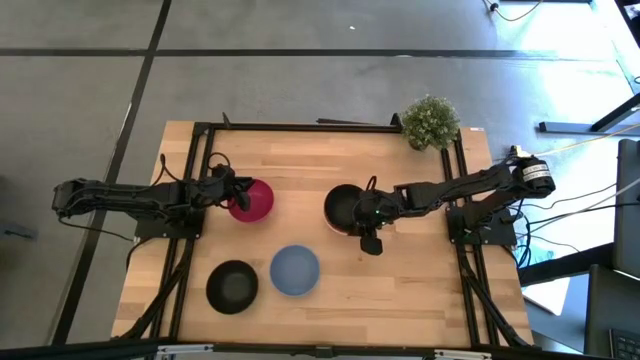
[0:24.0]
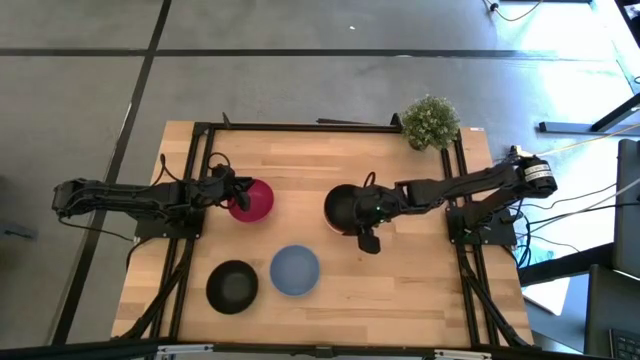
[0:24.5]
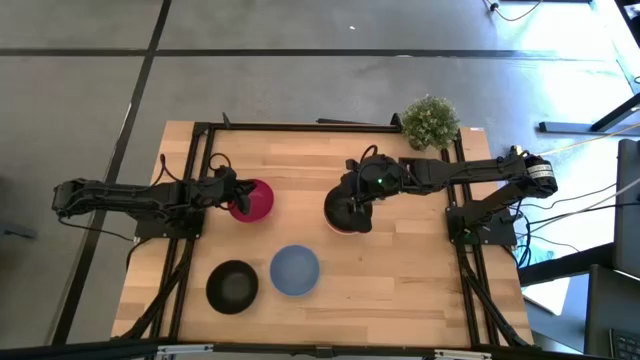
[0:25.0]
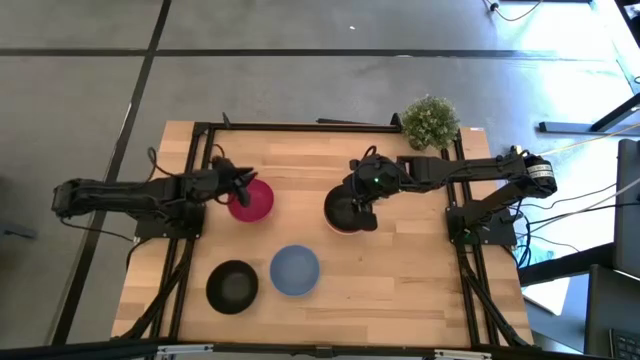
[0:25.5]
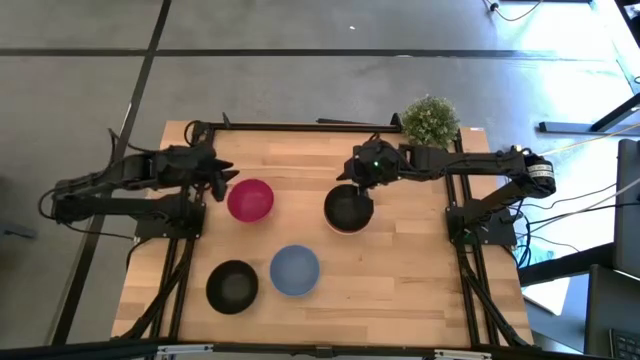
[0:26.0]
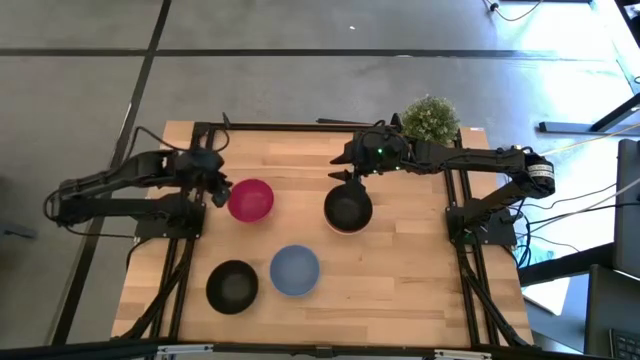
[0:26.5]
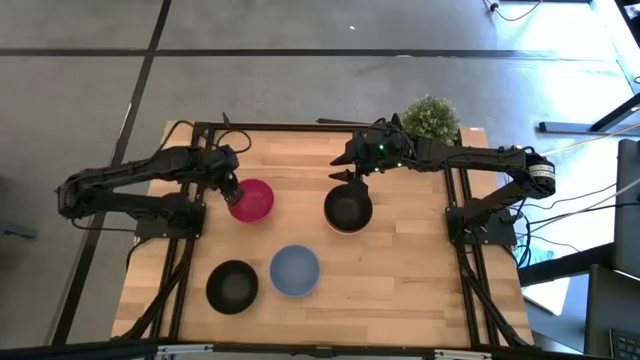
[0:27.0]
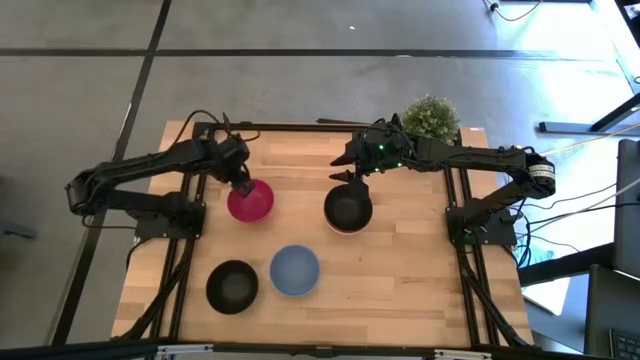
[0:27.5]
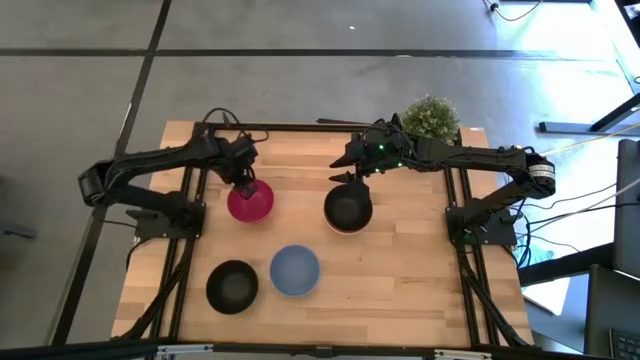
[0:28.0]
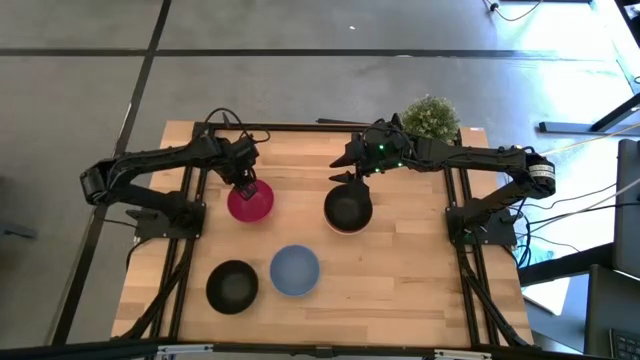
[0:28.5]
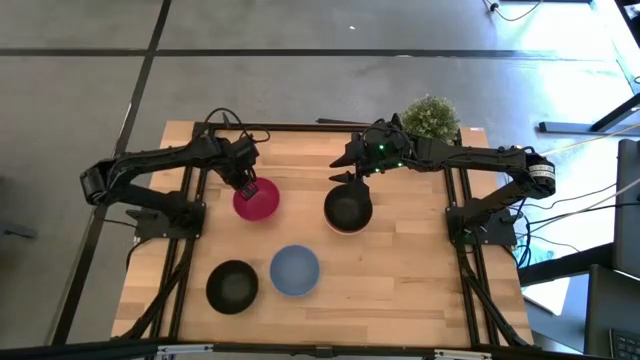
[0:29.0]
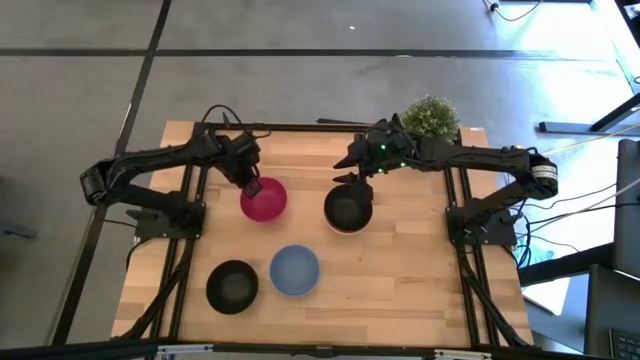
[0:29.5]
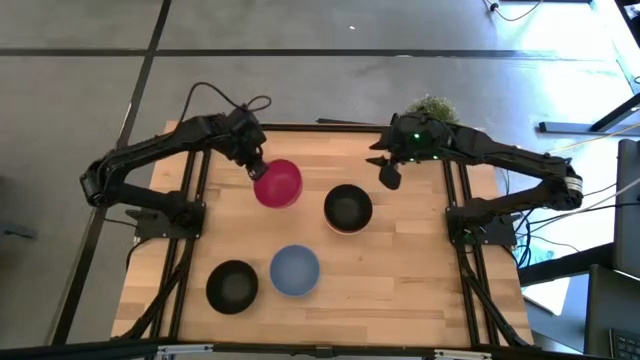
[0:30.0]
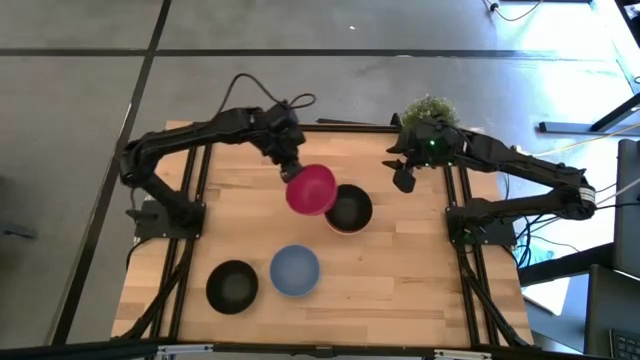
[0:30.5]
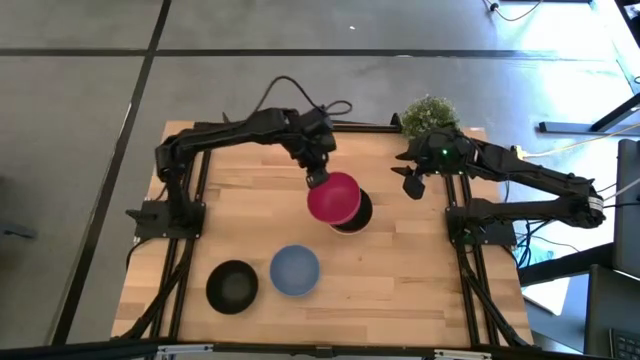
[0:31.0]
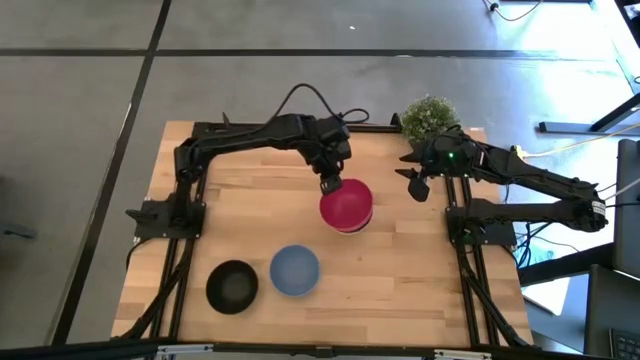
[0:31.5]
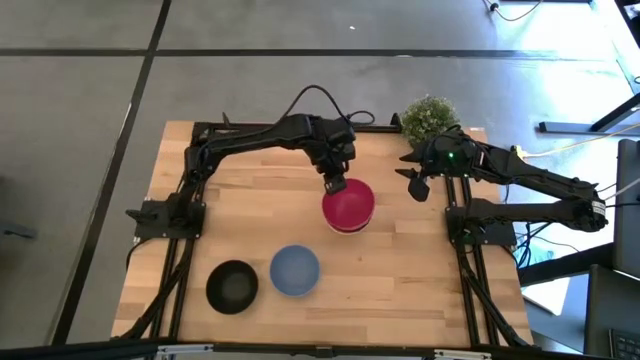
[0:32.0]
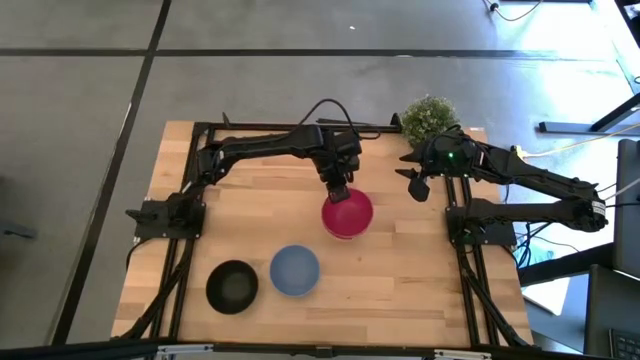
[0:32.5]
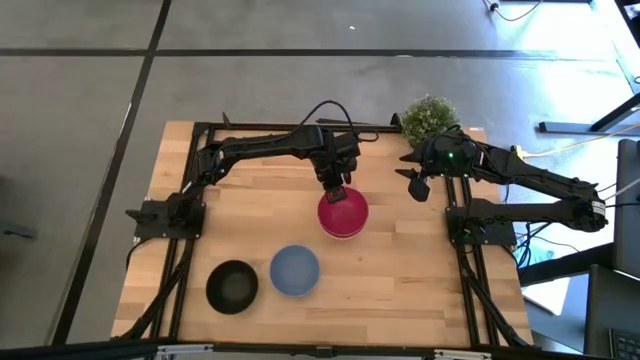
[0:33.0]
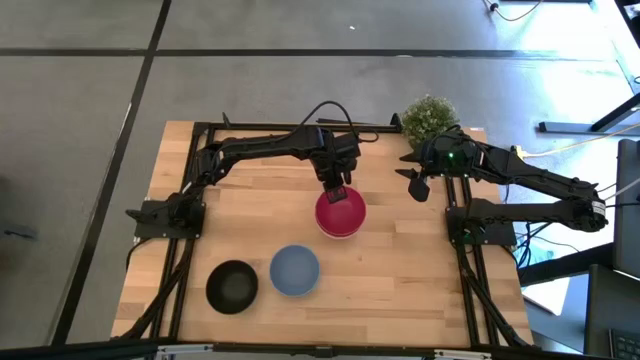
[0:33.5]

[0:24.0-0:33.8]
Task: Nest bowls inside each other
Stack the red bowl on top of the black bowl

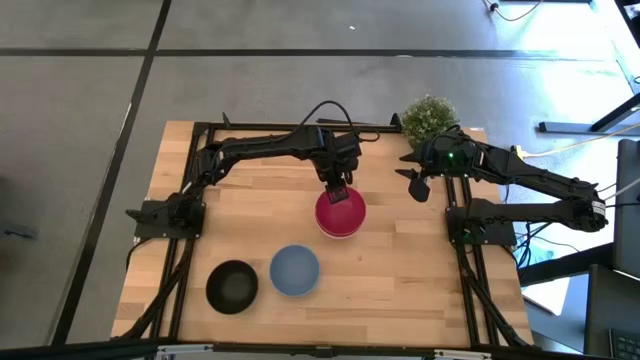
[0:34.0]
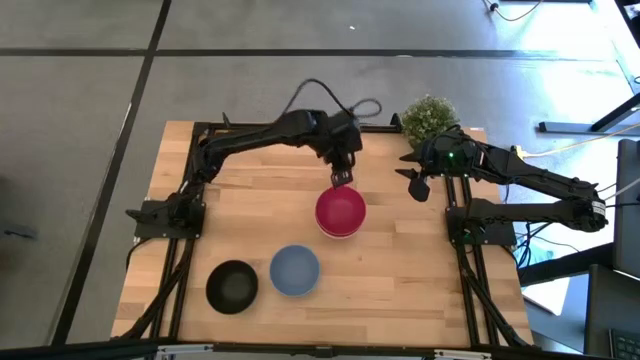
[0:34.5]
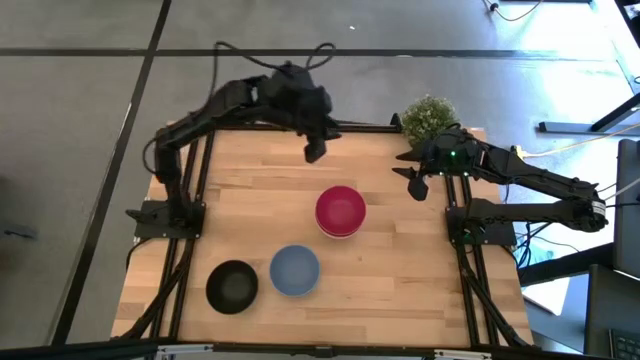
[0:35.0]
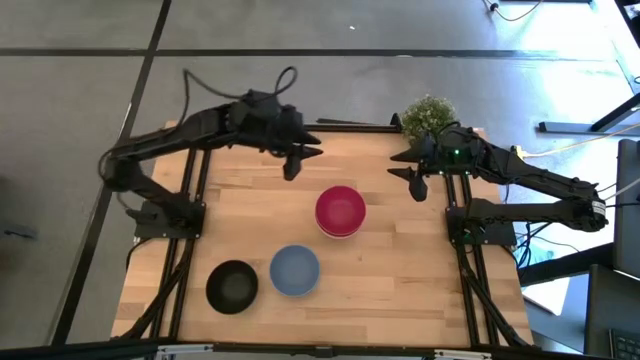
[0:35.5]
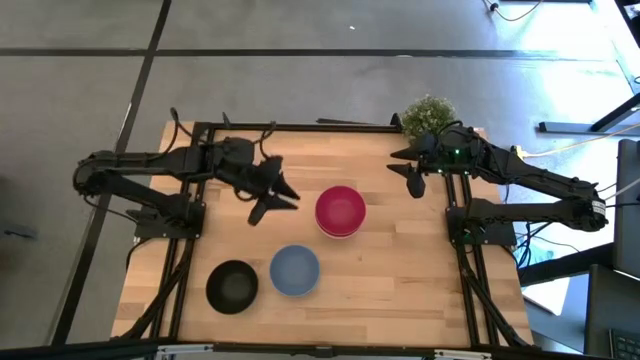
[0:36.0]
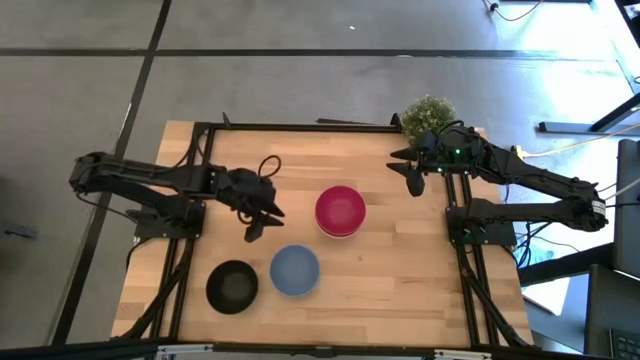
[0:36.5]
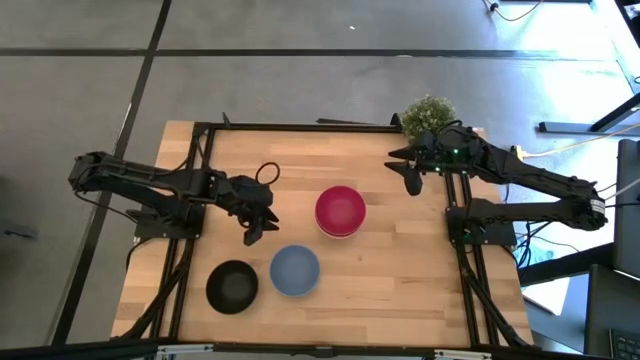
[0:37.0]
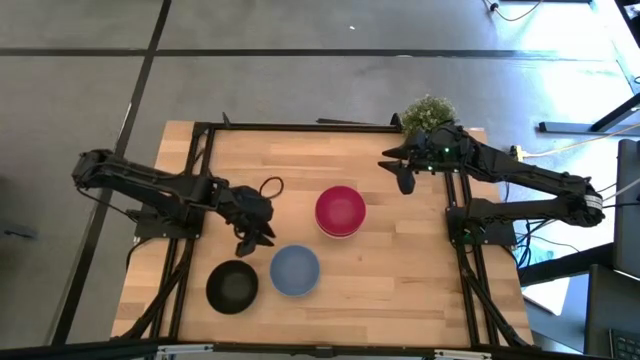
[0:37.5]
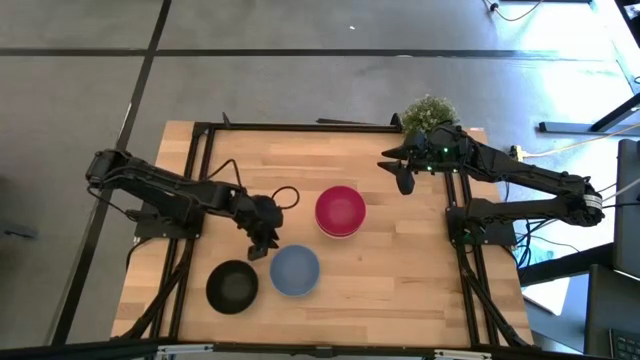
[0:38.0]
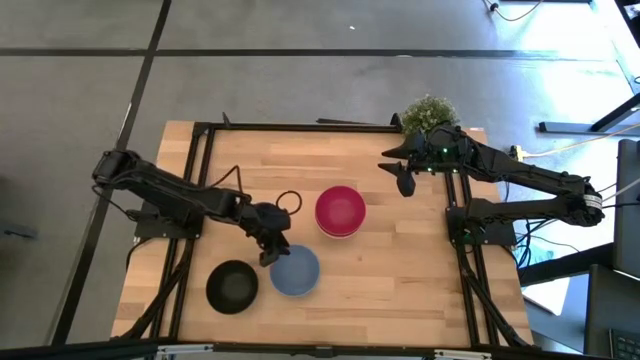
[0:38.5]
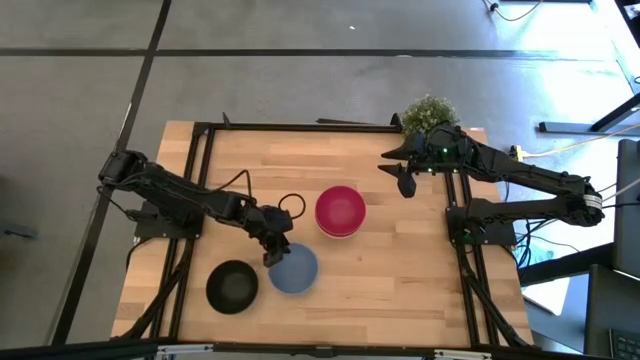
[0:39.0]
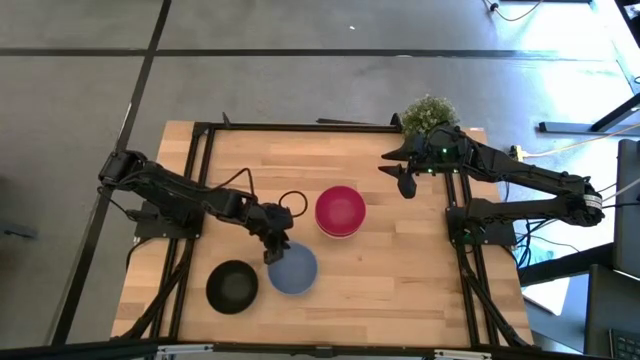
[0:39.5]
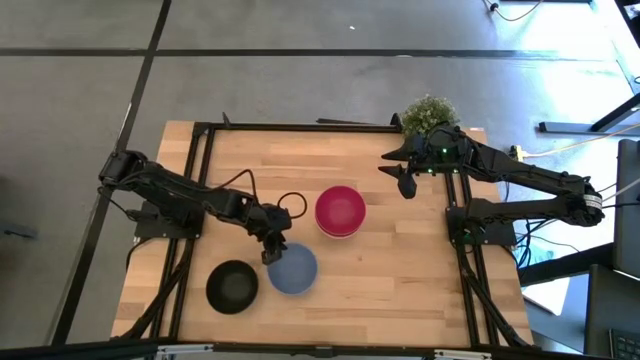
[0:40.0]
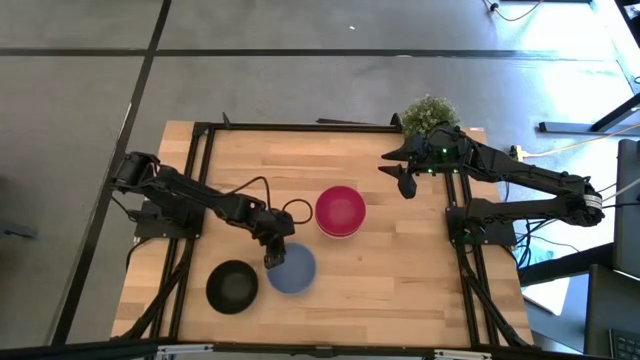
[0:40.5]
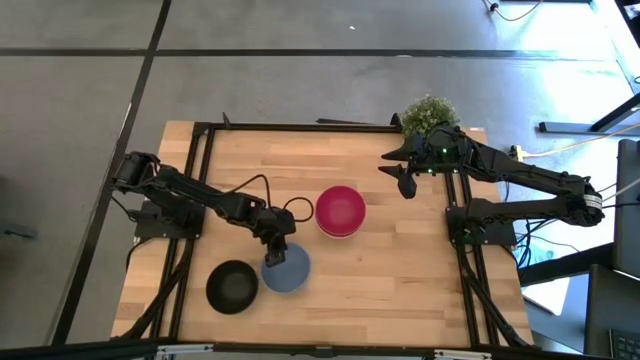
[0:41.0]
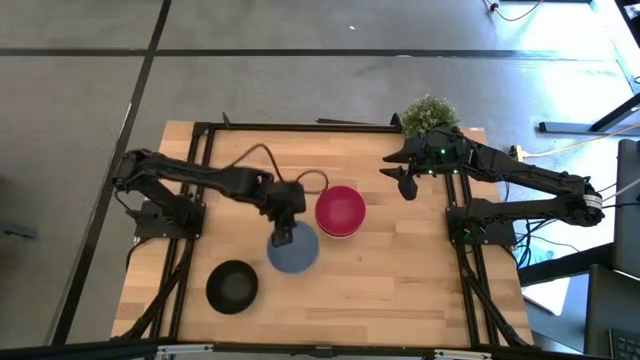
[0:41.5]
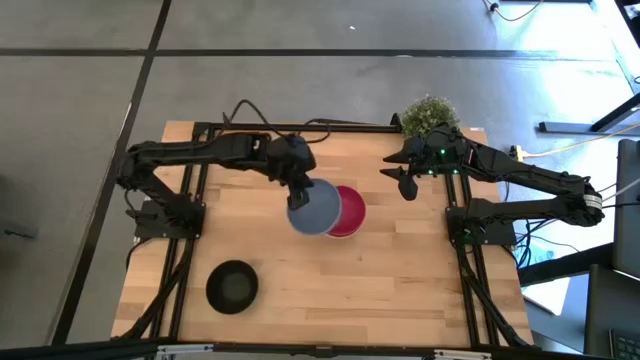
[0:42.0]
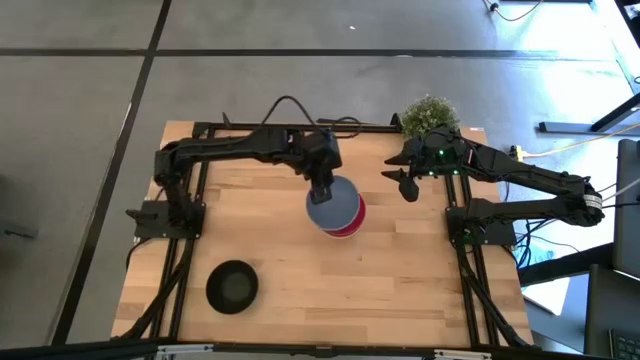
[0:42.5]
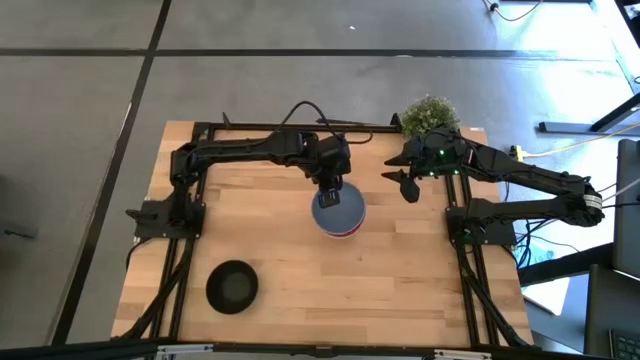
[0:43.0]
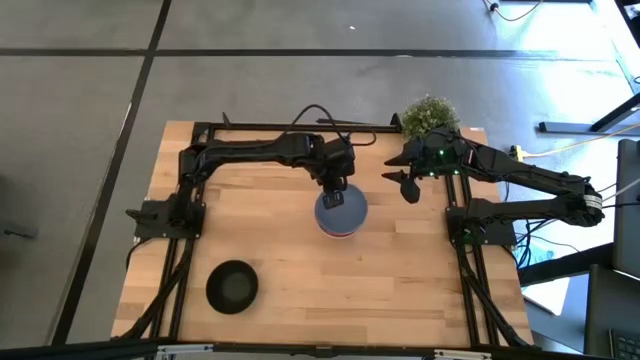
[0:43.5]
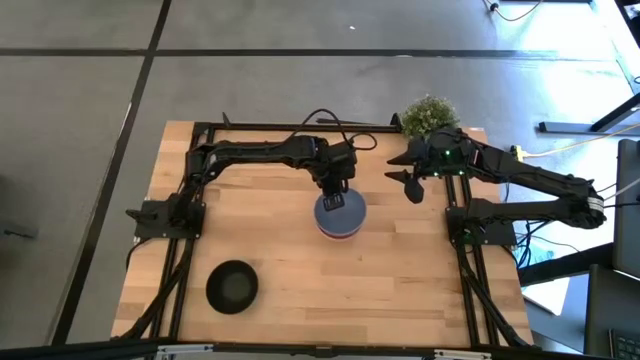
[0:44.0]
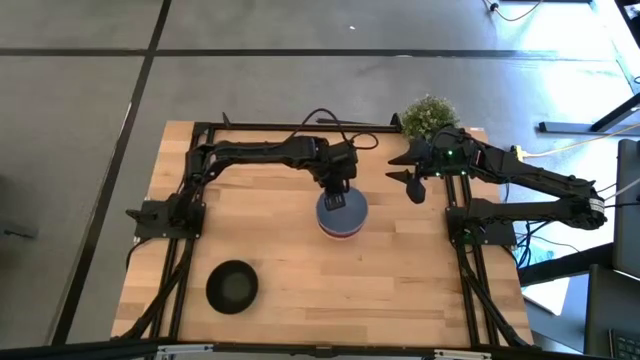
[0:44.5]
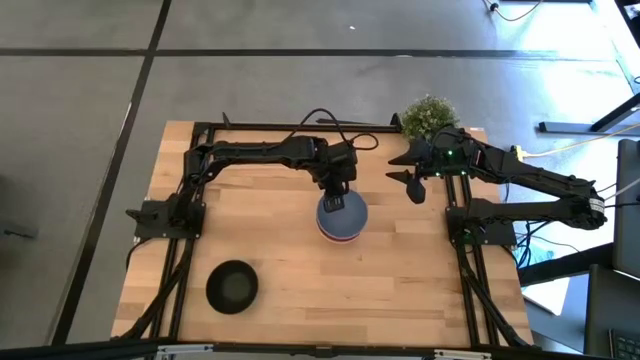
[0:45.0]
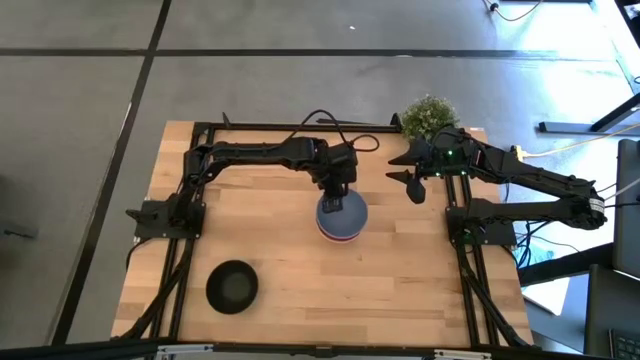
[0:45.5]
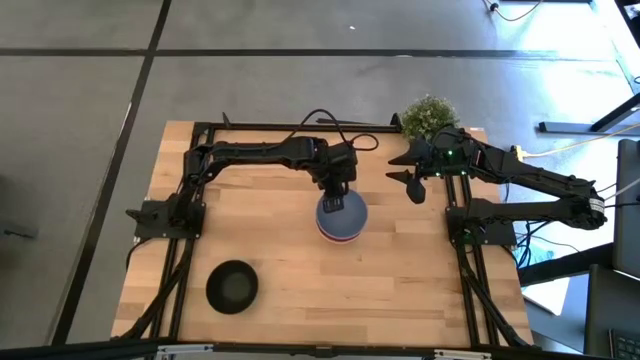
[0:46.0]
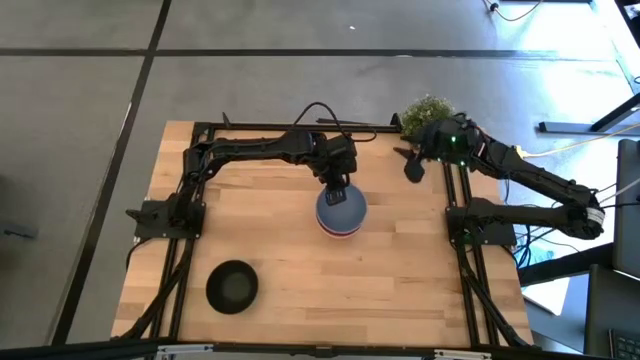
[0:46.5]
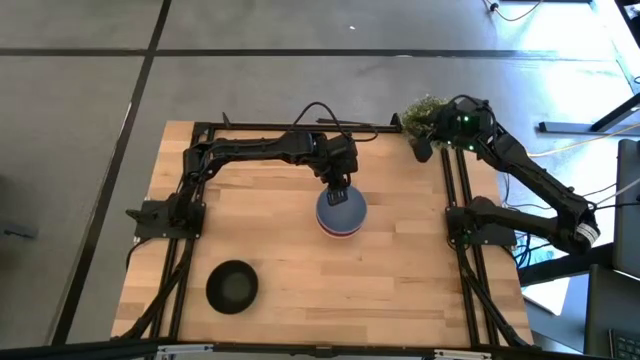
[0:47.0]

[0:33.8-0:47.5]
Stack the blue bowl on top of the red bowl
